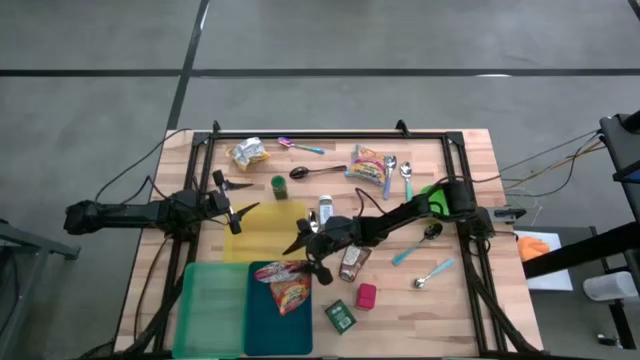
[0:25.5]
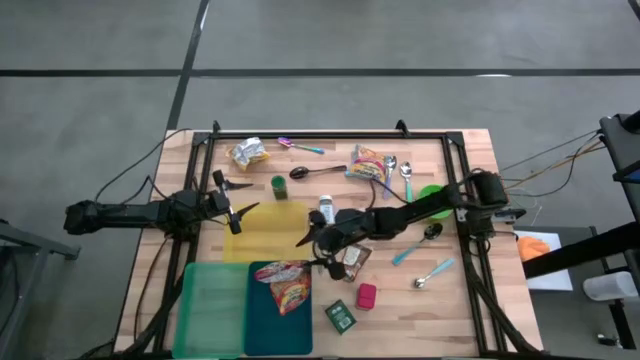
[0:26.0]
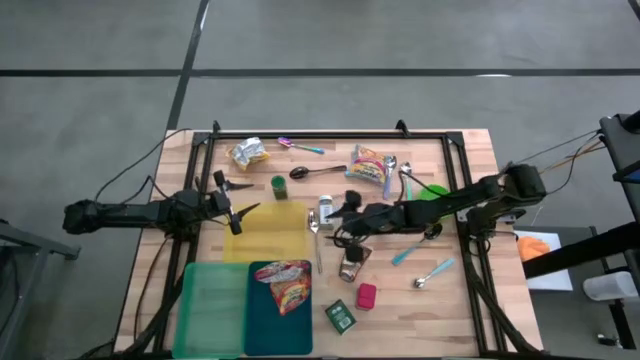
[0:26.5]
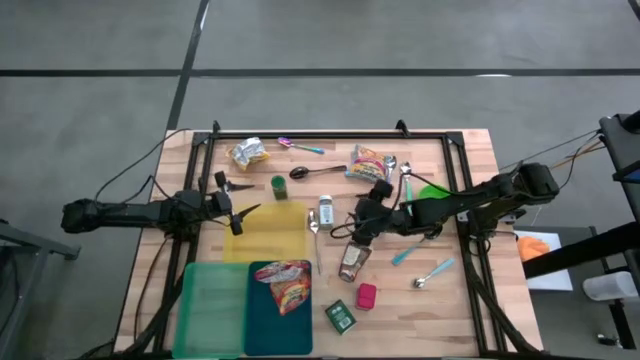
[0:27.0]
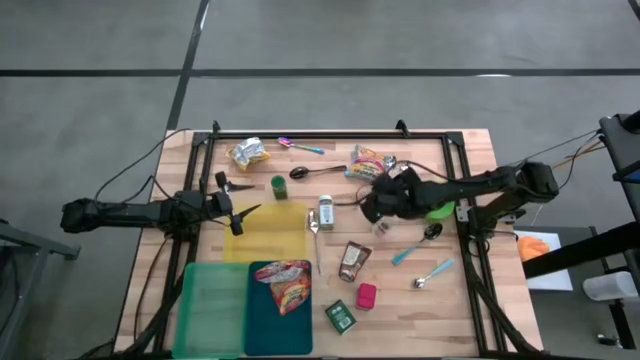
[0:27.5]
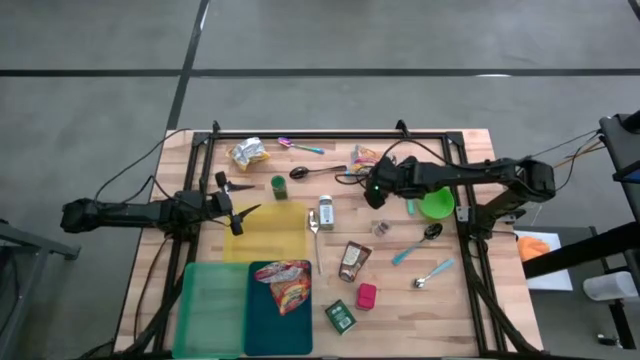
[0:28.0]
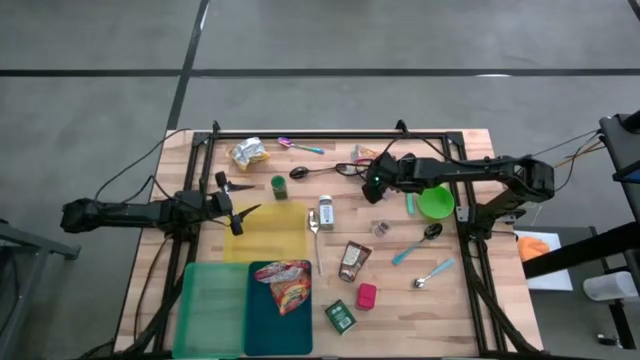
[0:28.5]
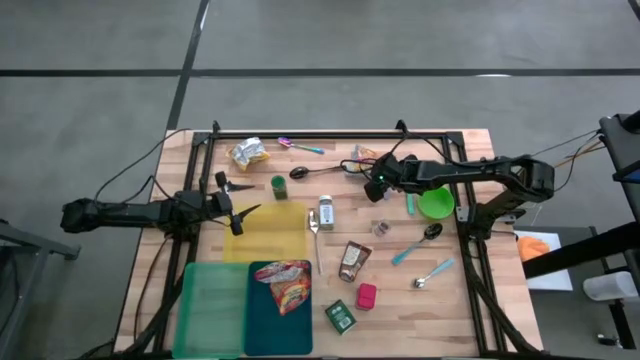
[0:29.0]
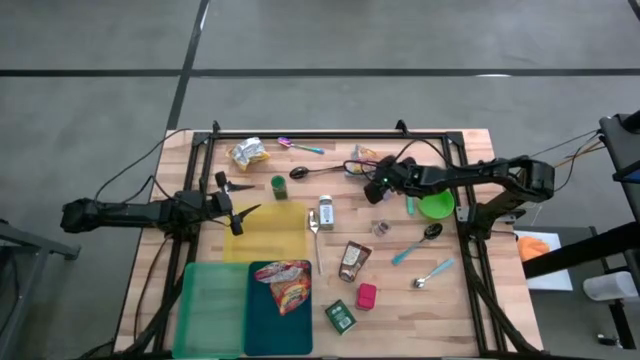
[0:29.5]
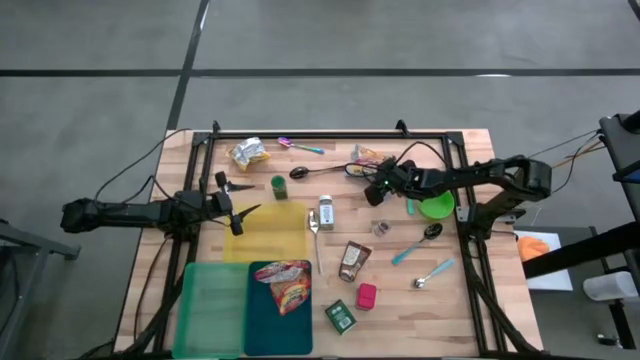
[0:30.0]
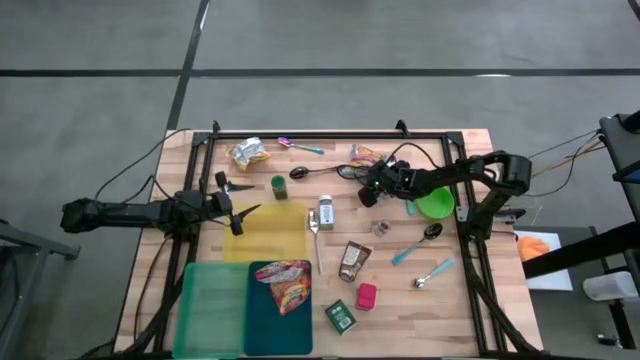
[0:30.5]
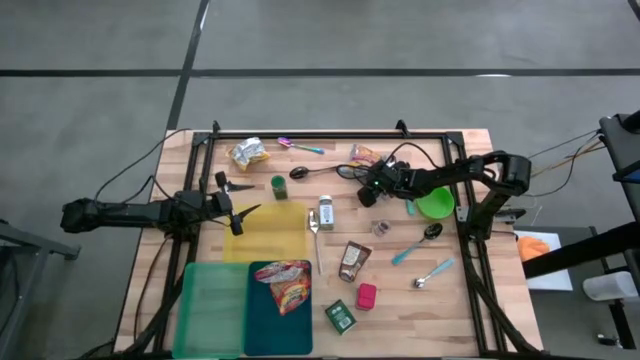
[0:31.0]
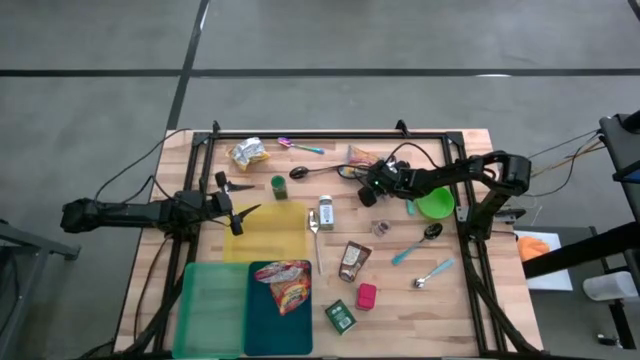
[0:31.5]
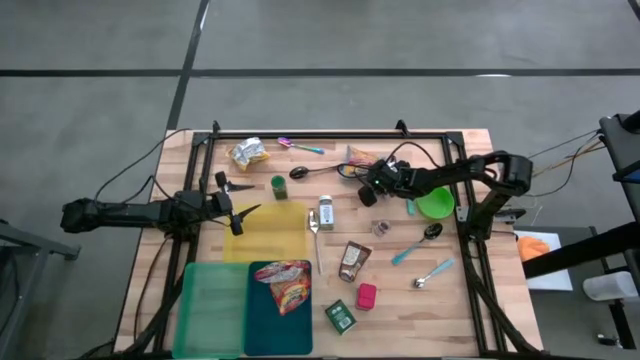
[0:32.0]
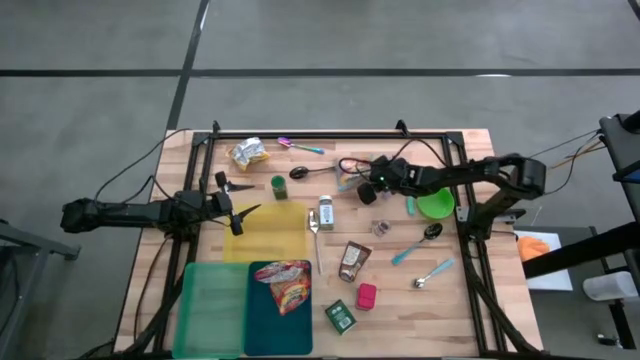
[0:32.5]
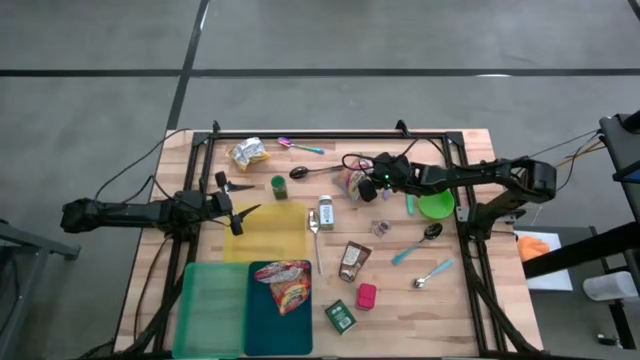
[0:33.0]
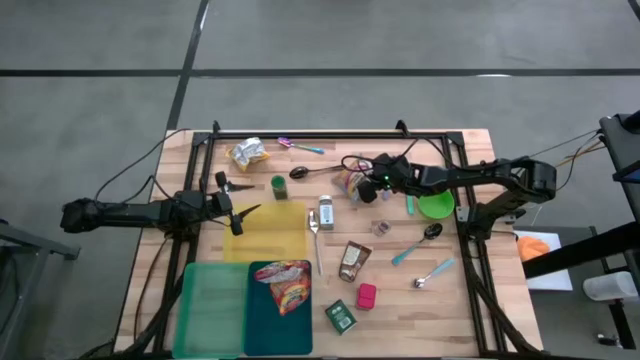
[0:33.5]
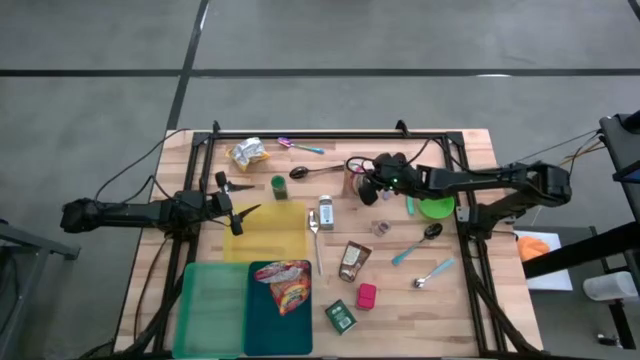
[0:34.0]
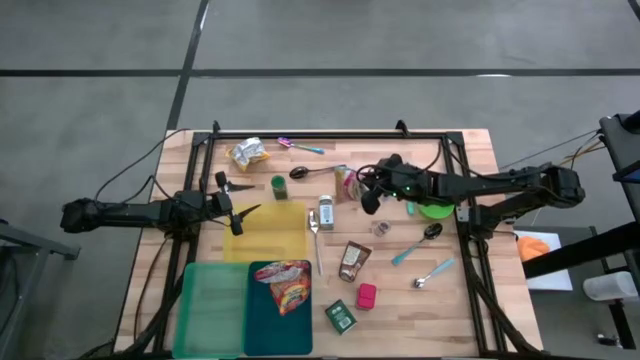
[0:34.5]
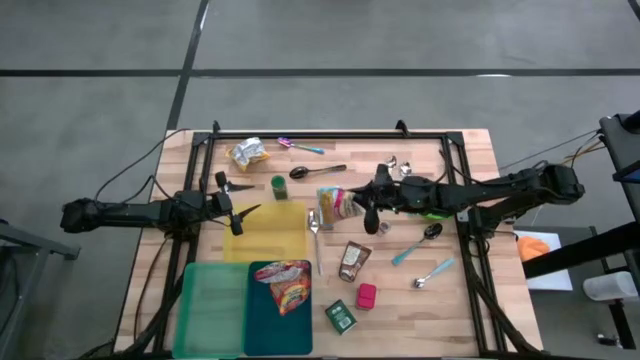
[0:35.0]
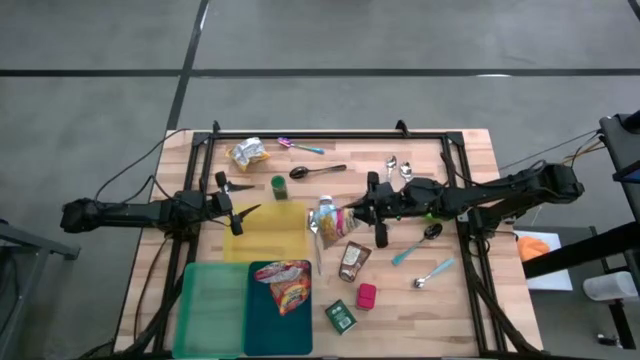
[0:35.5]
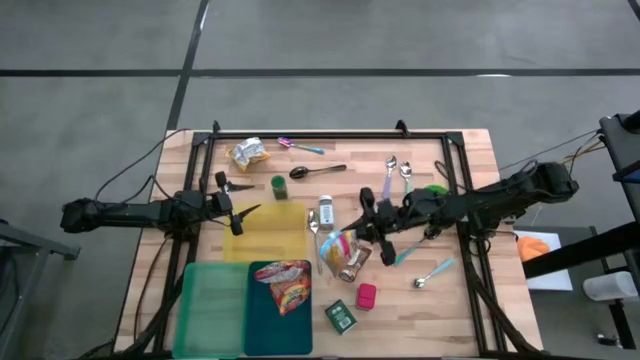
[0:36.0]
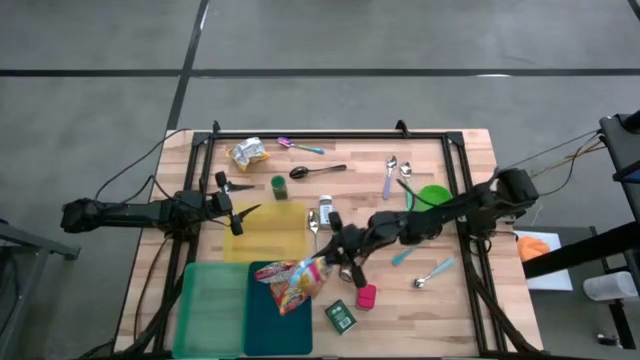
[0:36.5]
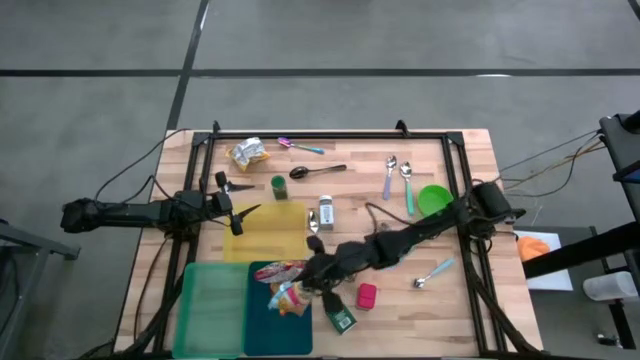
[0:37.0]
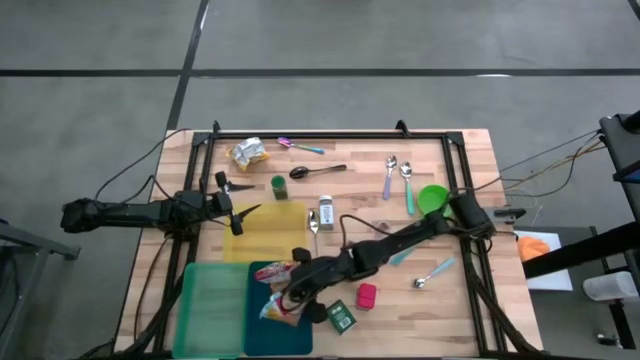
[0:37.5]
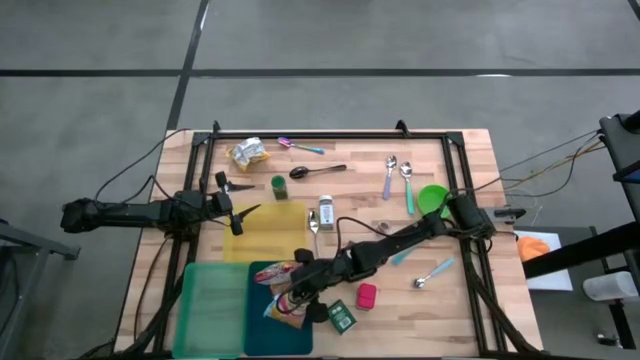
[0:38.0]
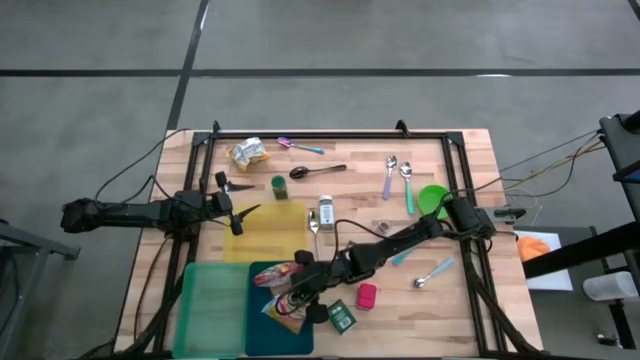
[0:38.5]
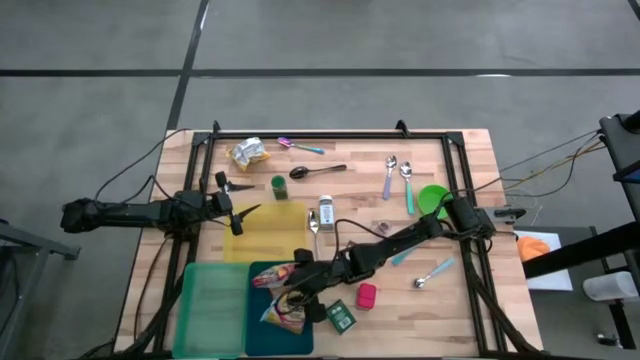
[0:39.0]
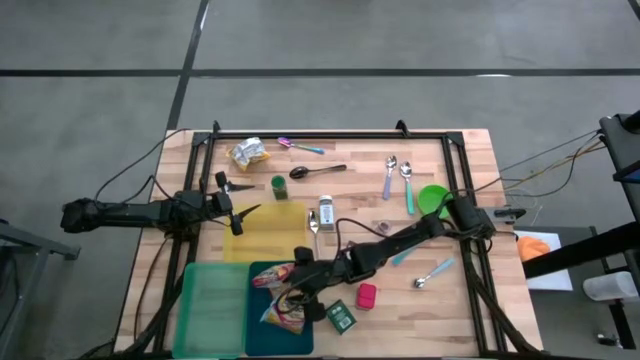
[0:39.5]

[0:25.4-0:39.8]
Put the blue noodle pack into the blue bin

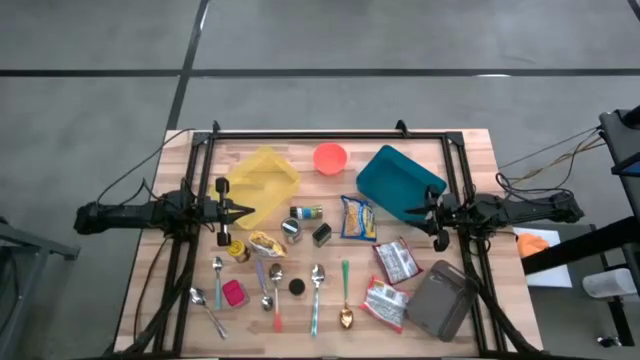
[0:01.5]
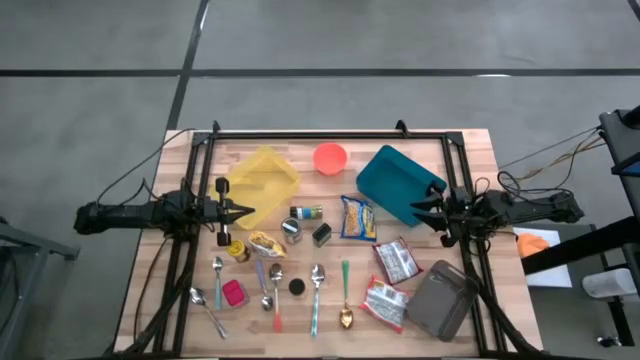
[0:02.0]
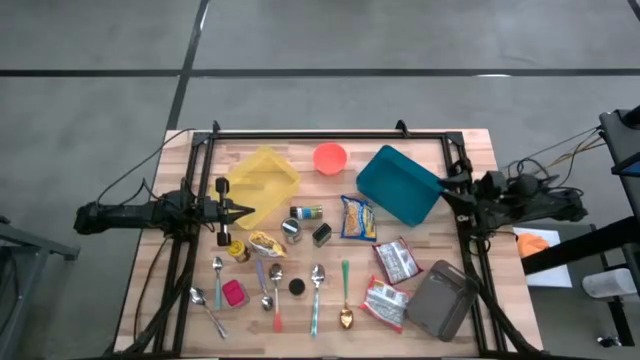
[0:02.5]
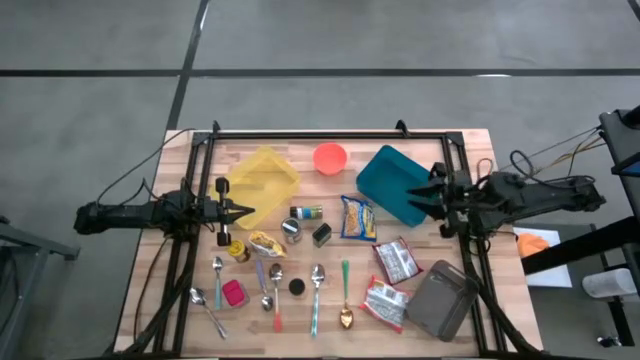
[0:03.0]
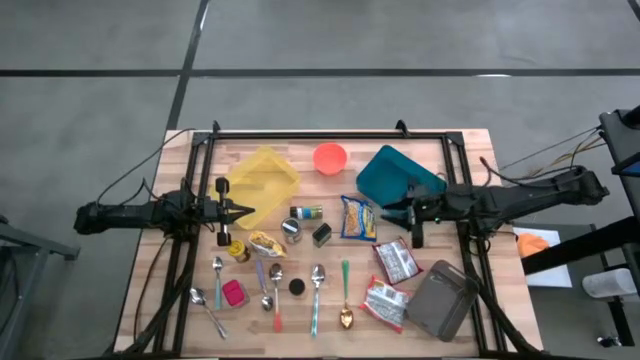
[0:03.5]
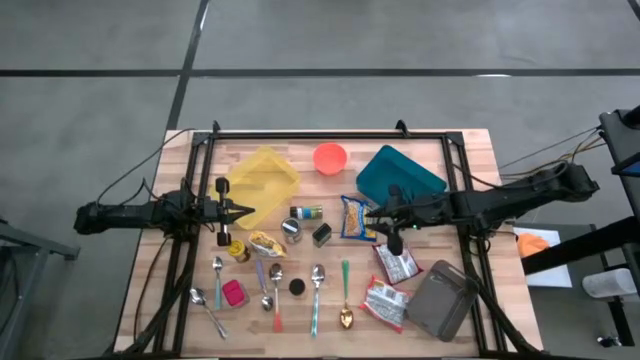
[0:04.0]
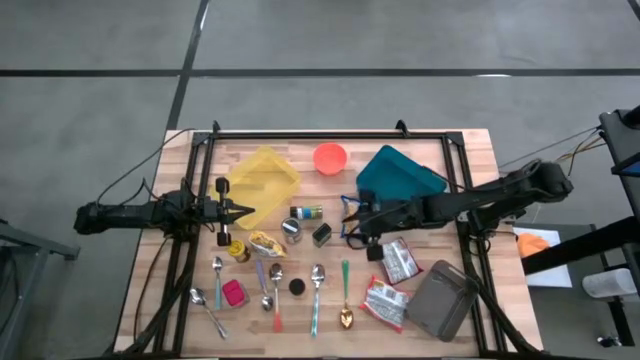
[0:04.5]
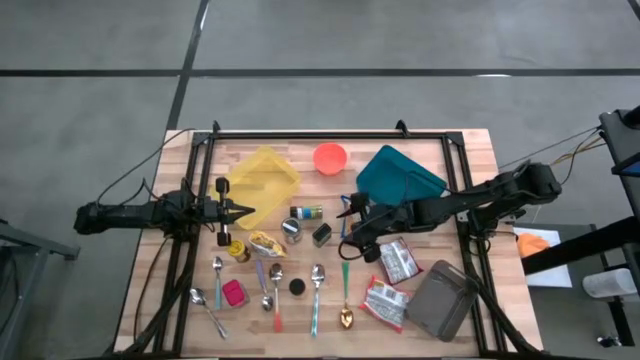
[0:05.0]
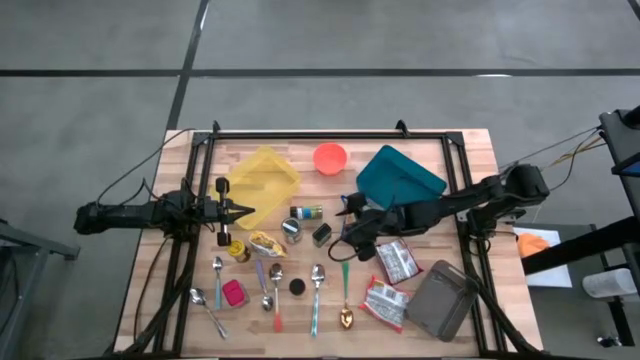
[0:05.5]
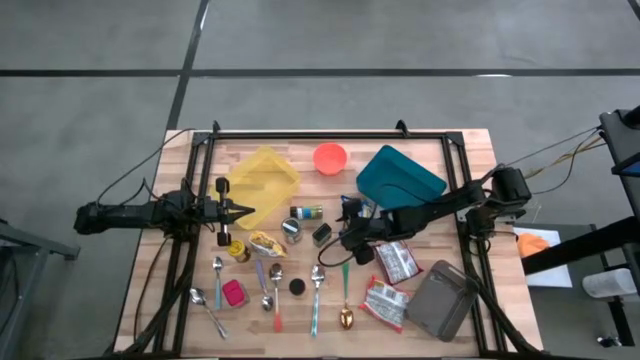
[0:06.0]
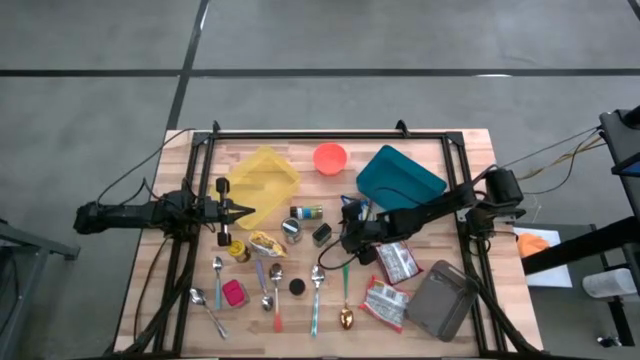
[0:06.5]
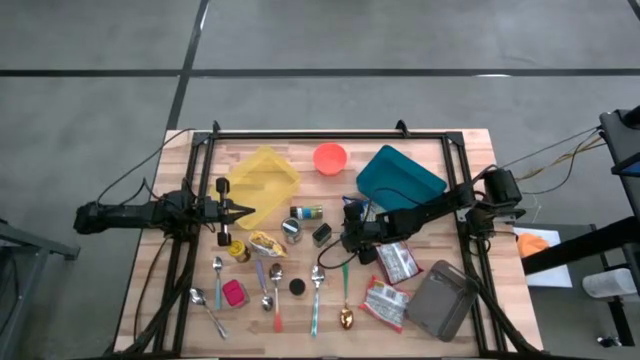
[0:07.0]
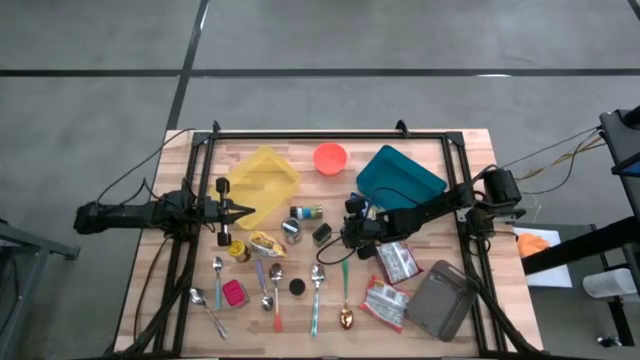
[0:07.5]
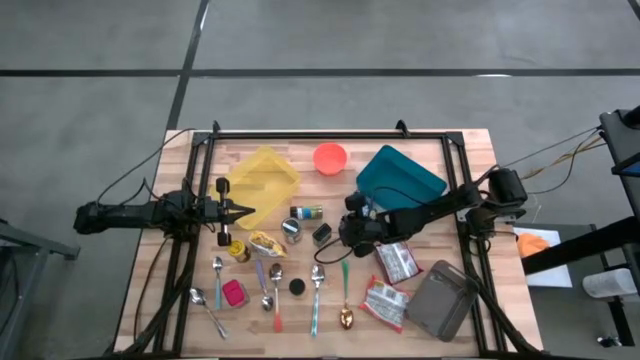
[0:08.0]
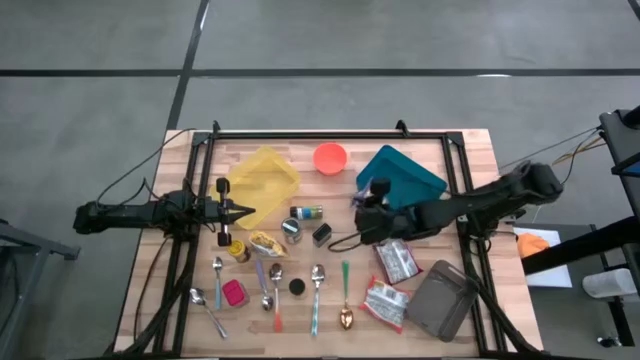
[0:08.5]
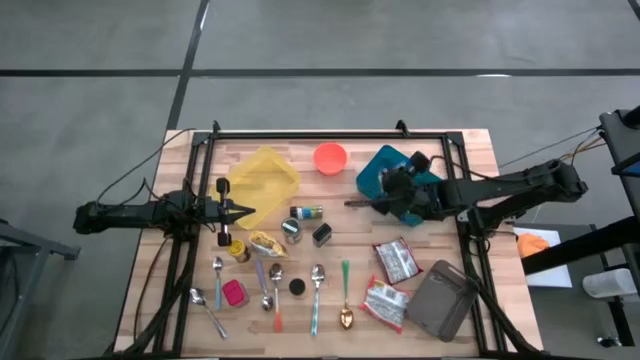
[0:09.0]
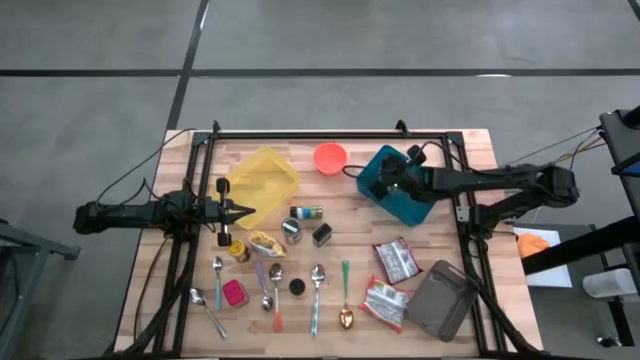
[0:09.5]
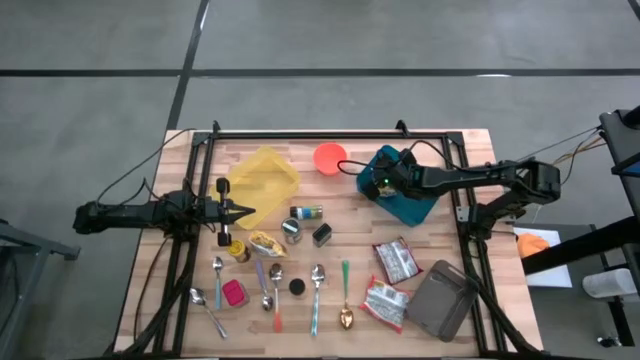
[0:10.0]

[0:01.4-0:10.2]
Put the blue noodle pack into the blue bin
